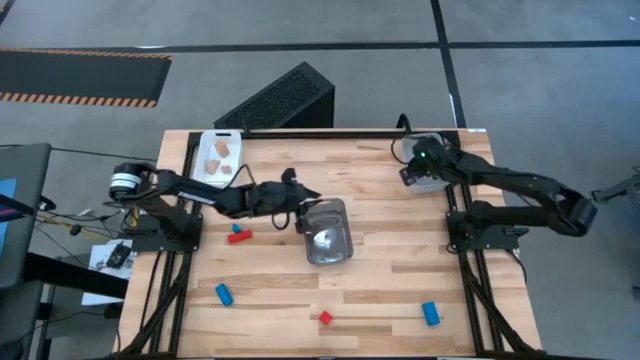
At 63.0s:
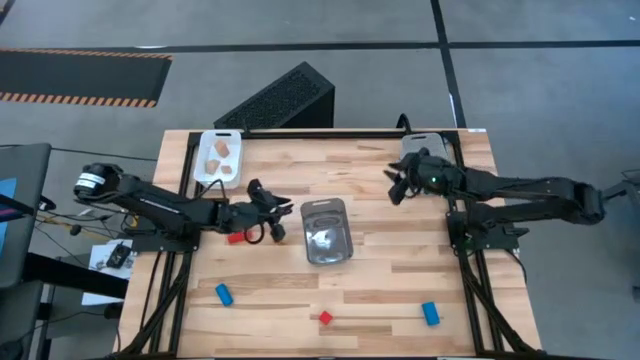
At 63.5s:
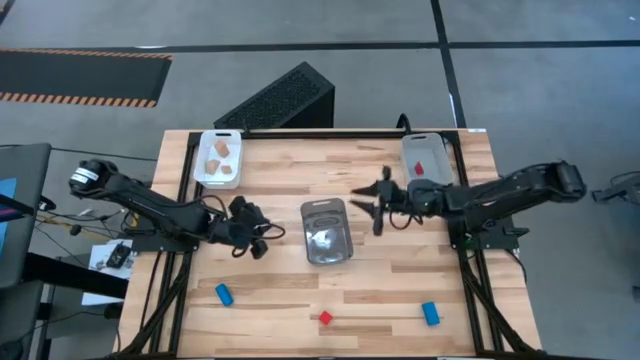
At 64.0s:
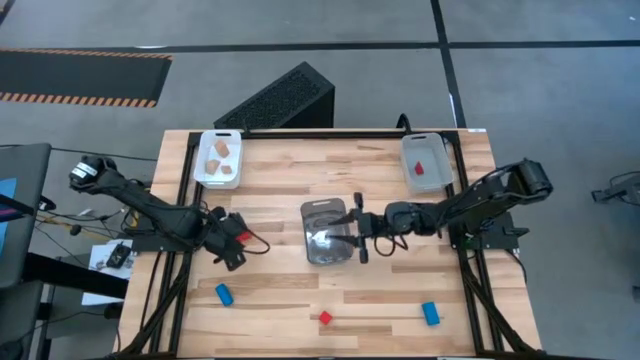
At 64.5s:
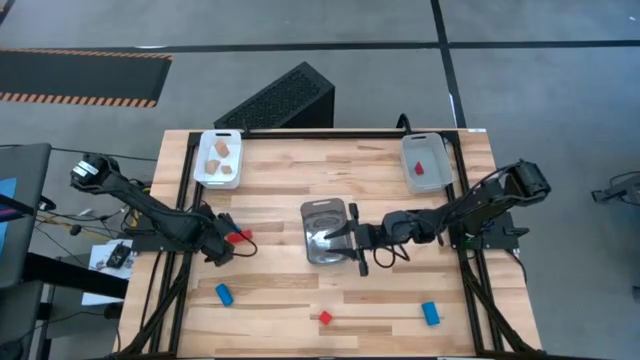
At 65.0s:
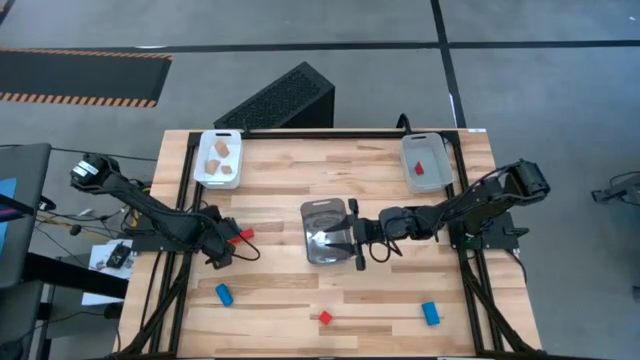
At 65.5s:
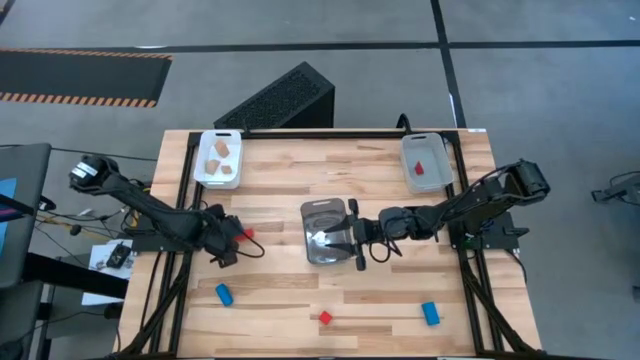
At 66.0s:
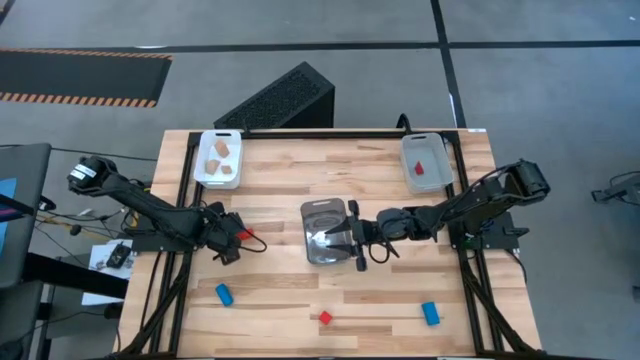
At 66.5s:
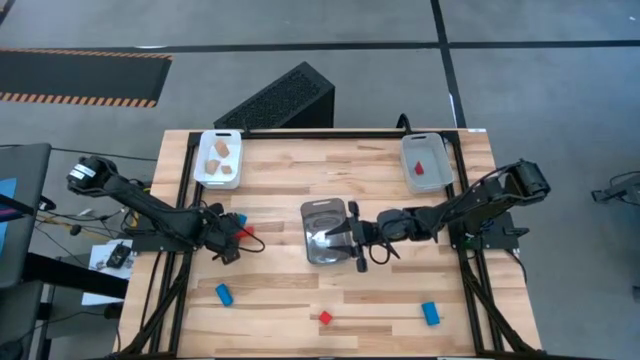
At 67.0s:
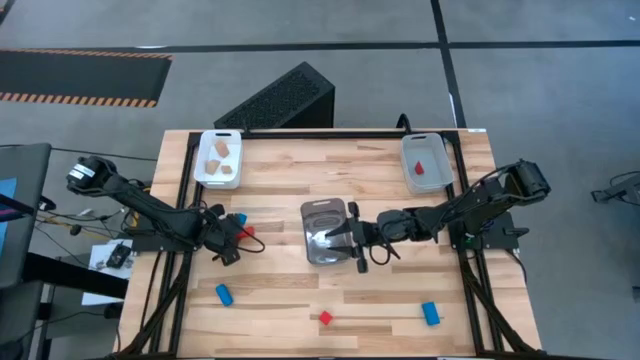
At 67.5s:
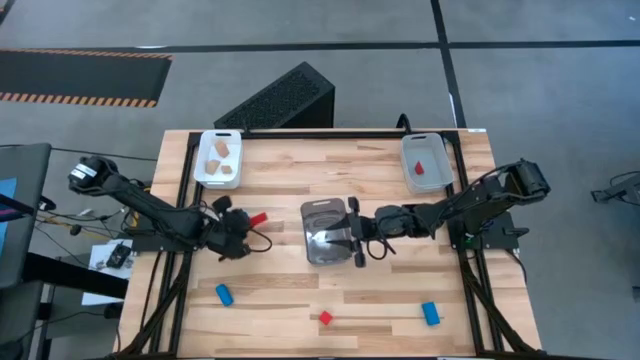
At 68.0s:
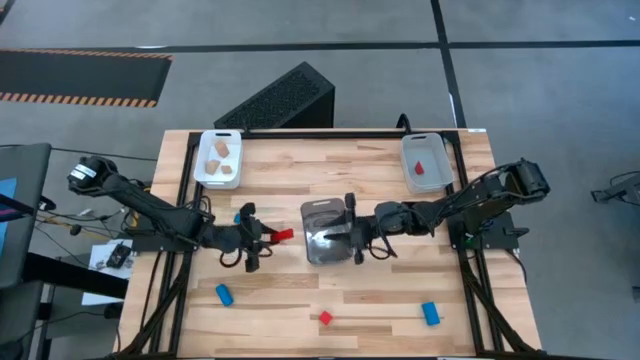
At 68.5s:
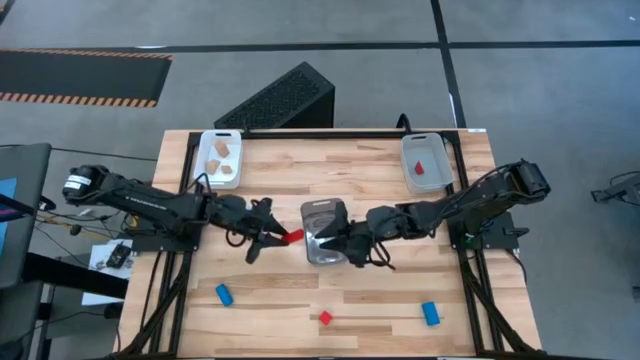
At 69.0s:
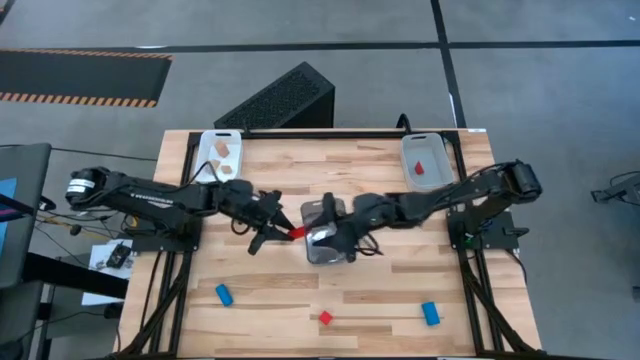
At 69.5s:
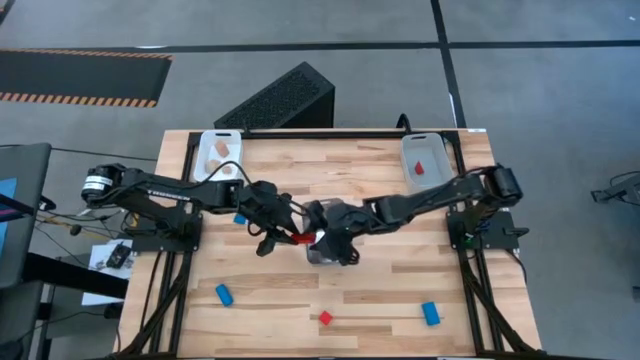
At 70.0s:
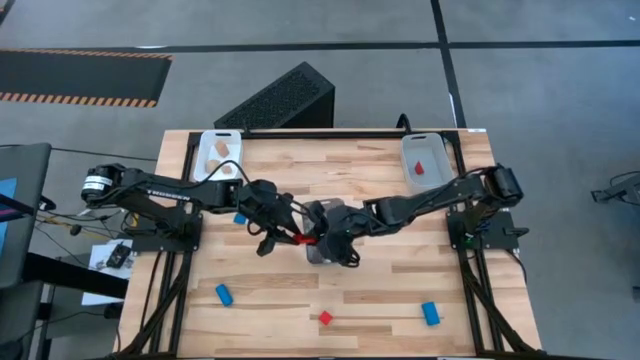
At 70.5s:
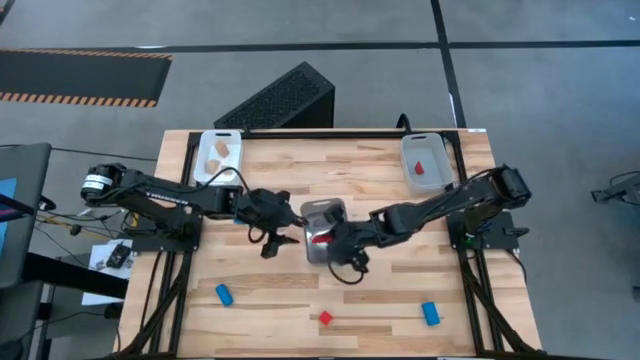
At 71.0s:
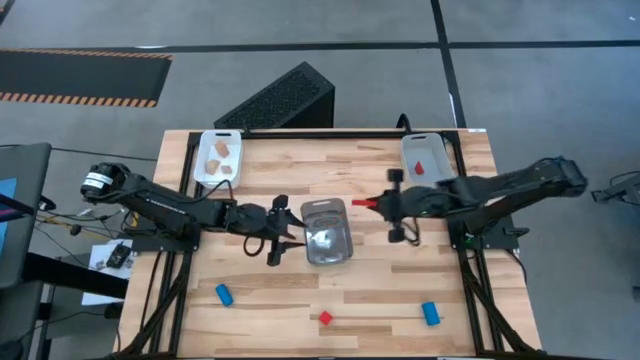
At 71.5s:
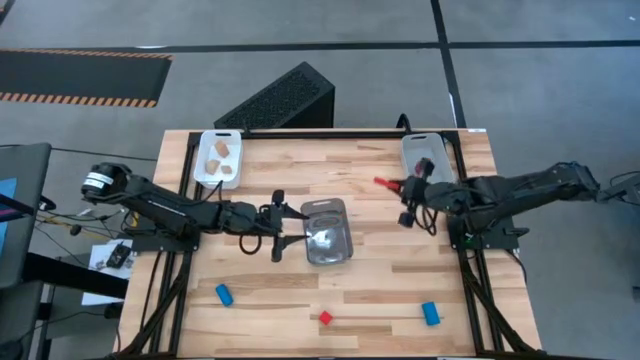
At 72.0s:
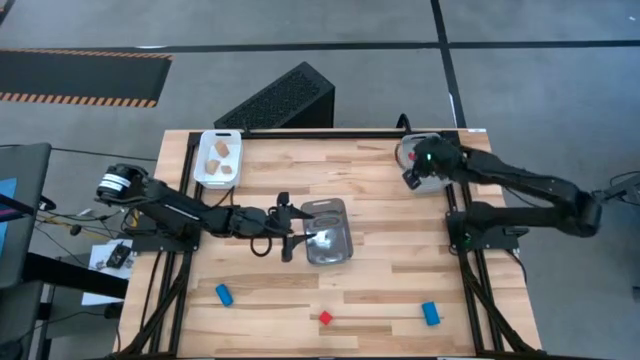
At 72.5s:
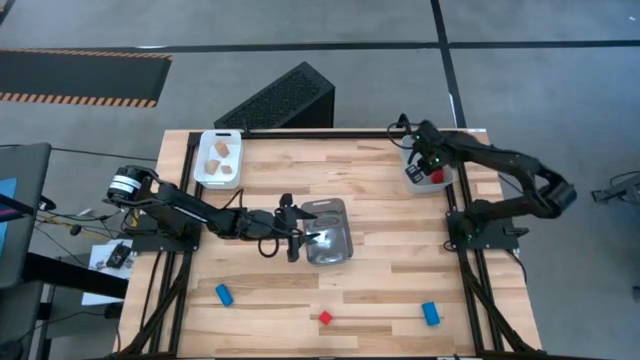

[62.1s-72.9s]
Task: Sort & place blocks by color
Put the top red block into the gray bin

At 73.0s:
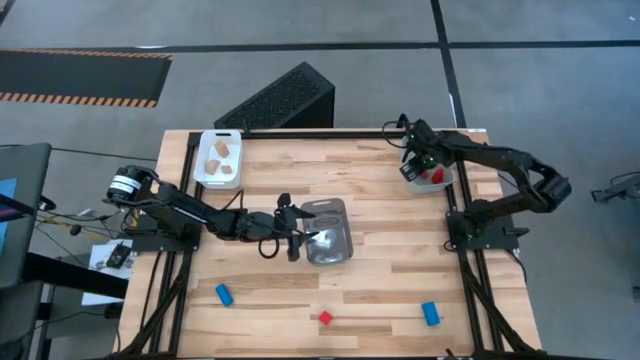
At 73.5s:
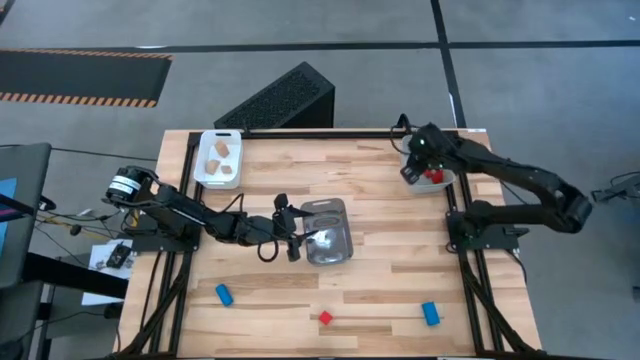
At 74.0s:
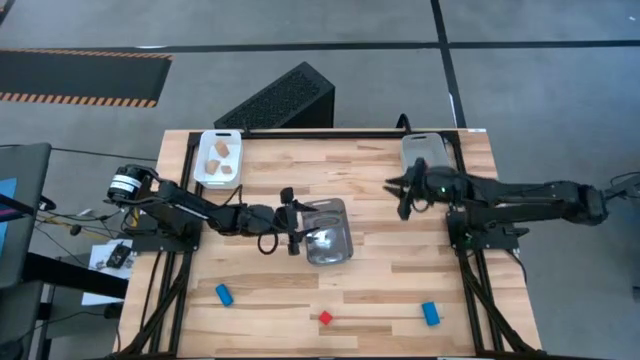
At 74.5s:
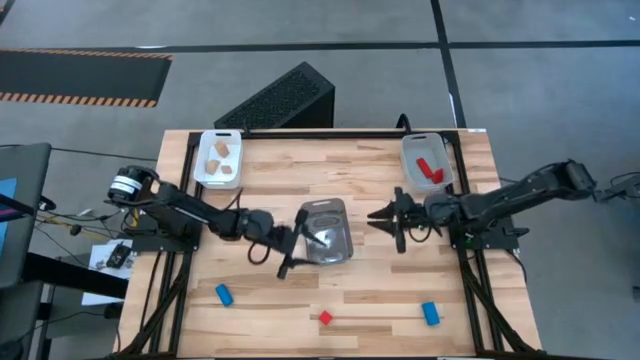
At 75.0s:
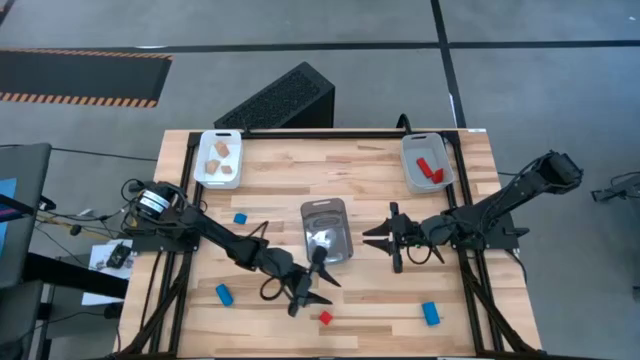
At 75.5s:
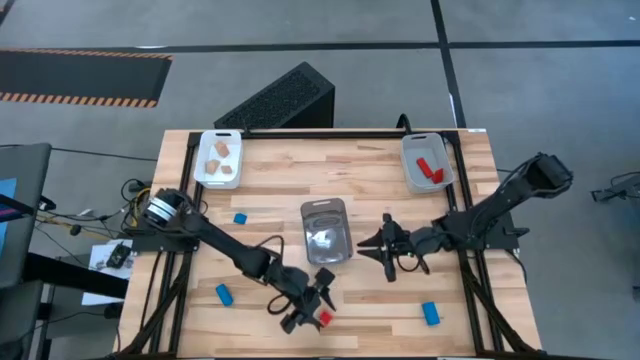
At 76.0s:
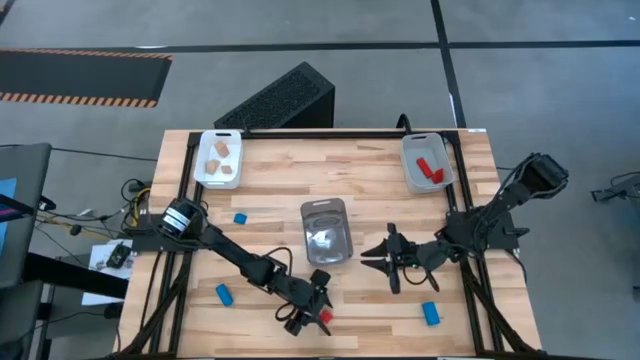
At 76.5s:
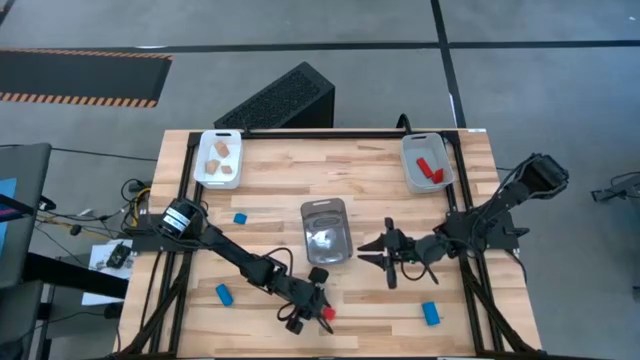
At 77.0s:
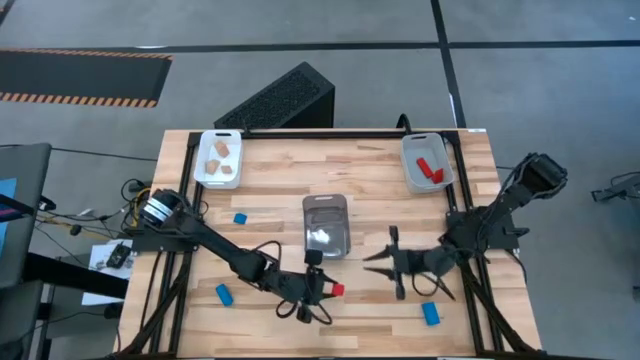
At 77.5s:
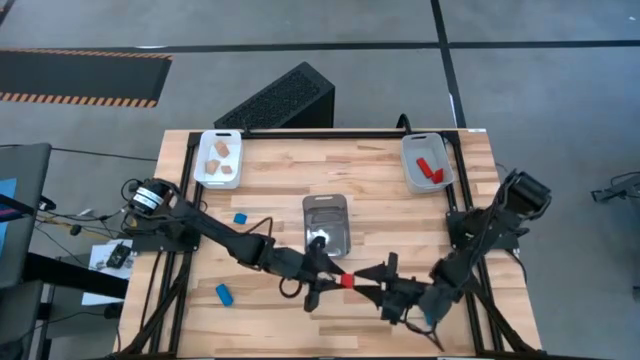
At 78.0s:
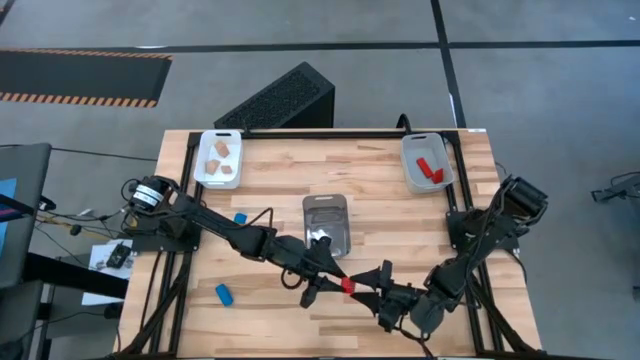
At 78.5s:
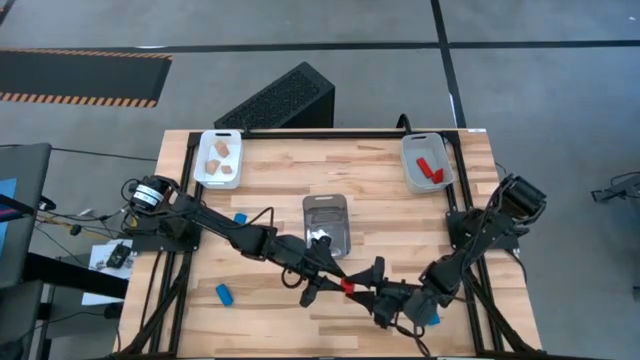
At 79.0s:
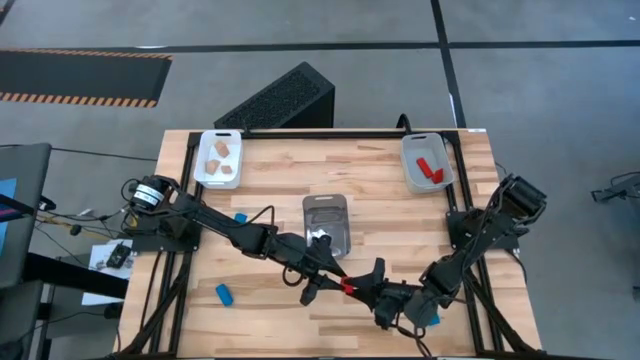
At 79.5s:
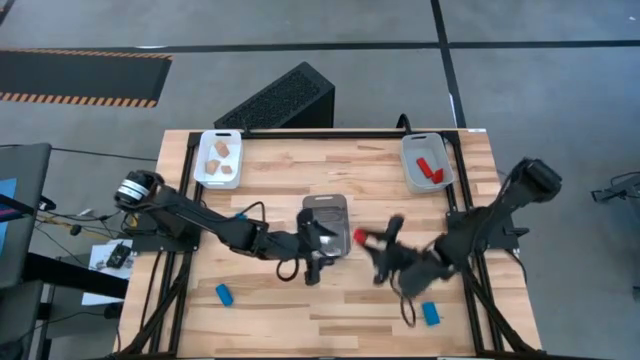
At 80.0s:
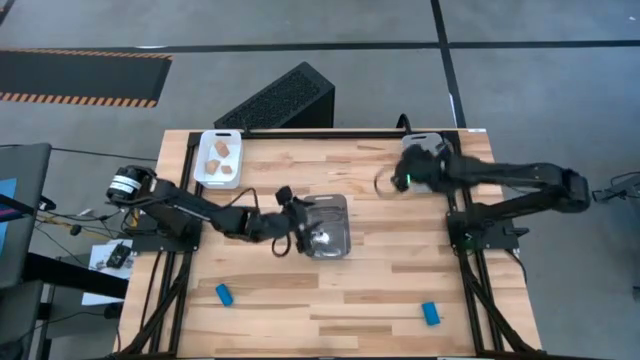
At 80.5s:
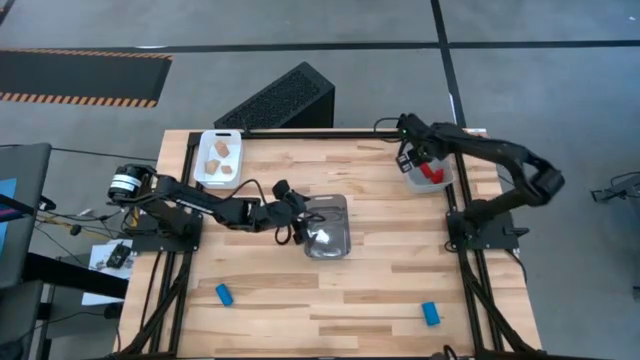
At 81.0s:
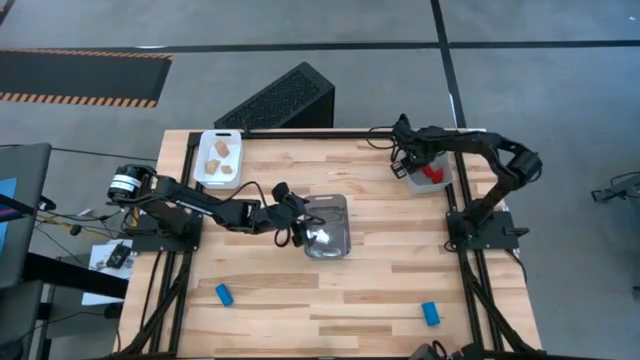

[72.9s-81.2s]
Put the red block into the gray bin

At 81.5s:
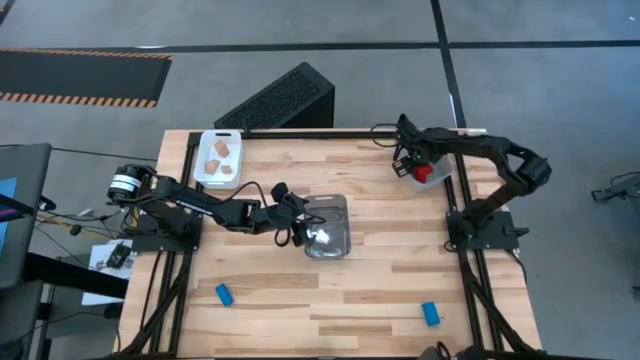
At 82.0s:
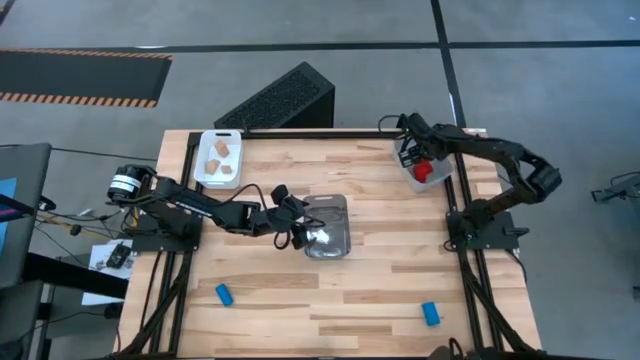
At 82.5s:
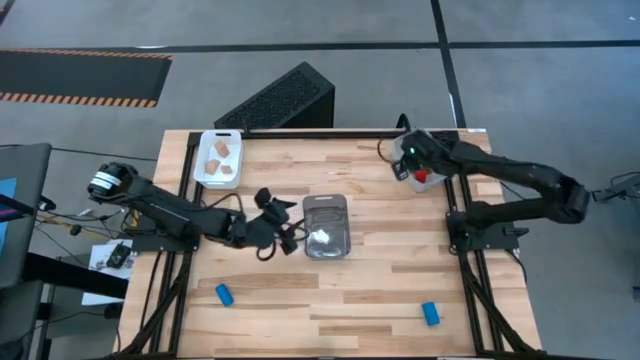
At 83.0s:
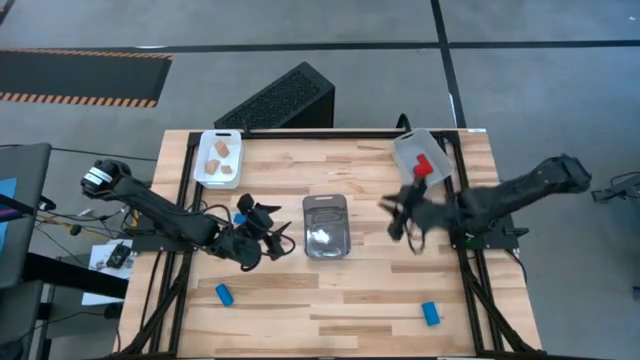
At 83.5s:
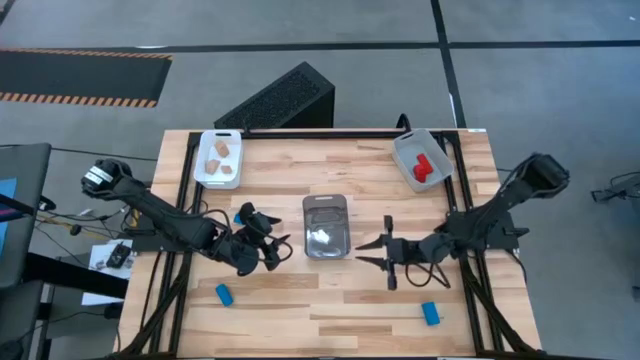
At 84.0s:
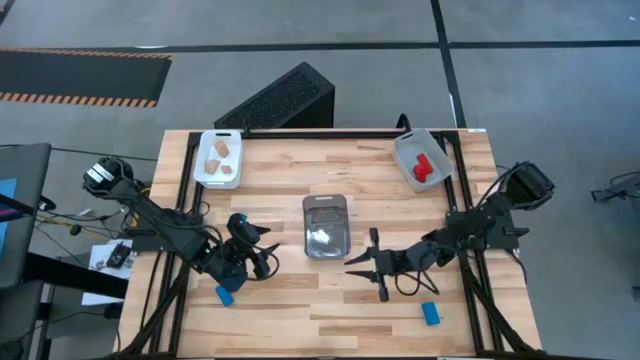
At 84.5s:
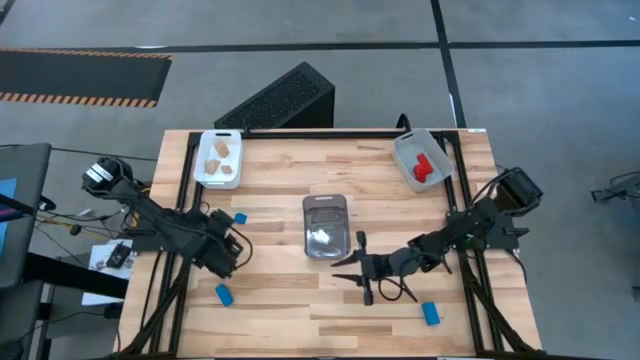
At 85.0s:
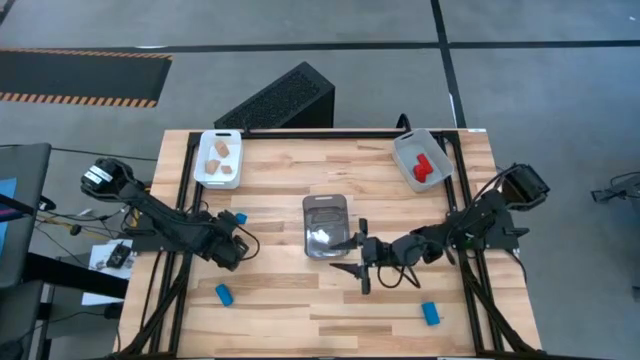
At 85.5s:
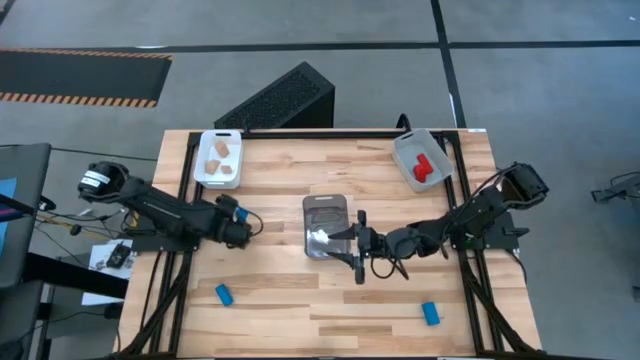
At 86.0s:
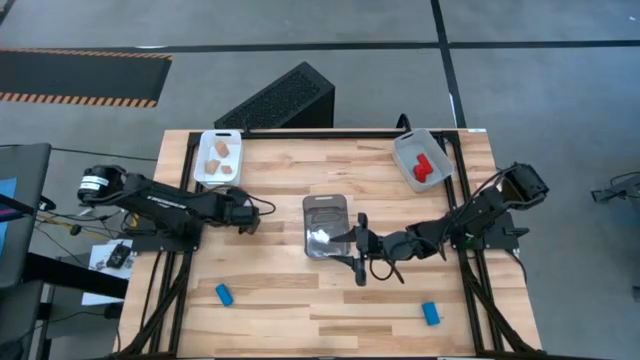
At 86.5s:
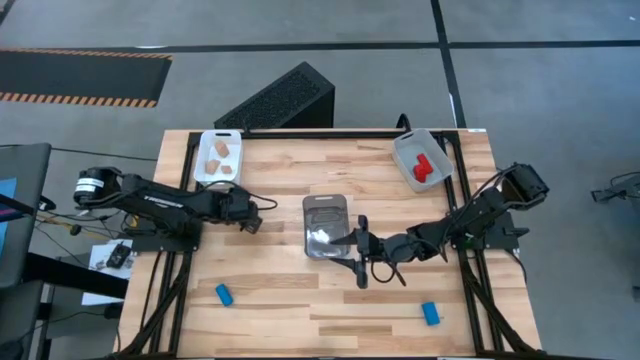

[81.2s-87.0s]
Put the top left blue block into the black bin
